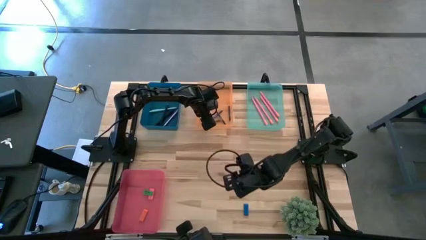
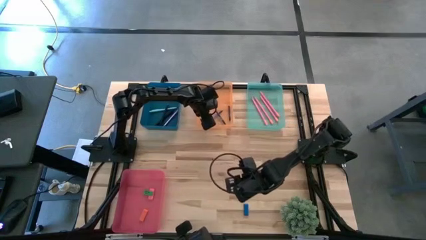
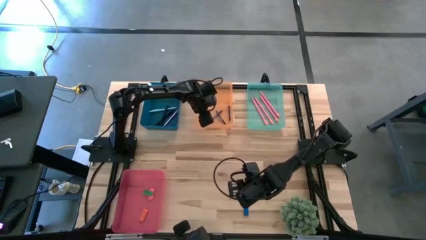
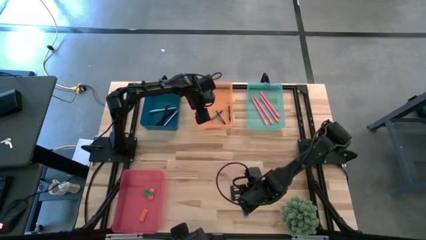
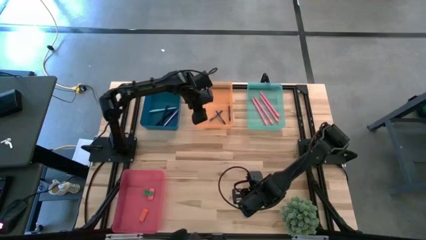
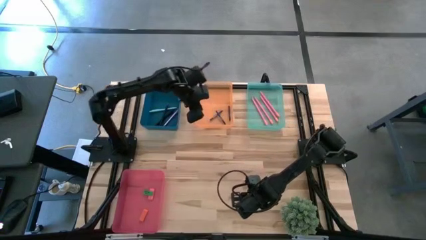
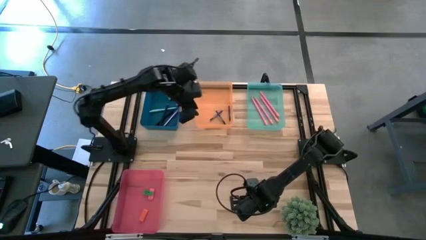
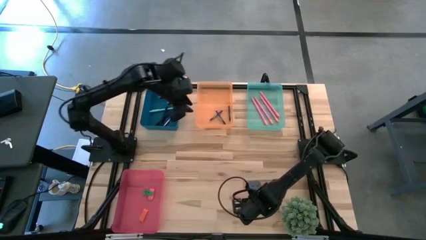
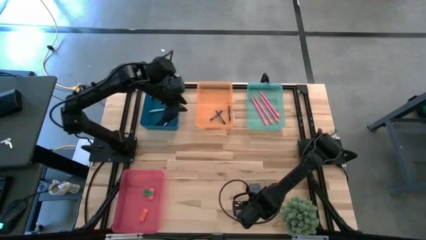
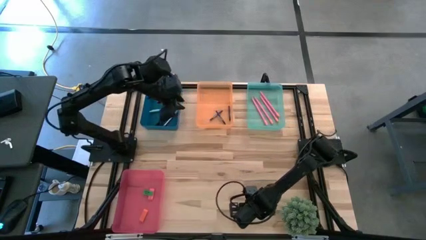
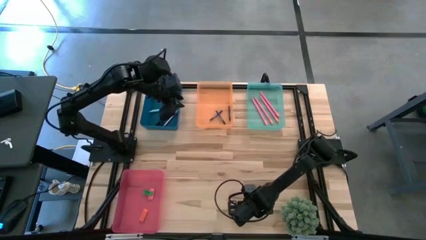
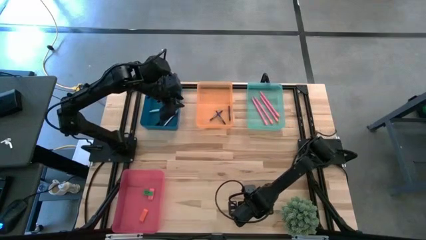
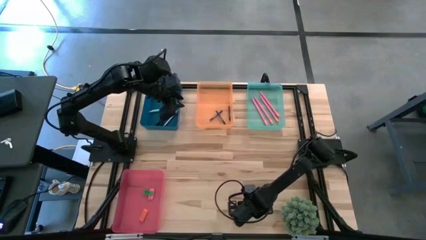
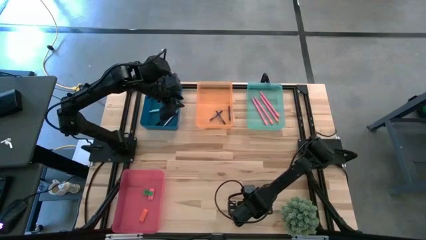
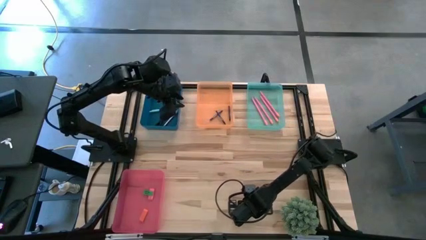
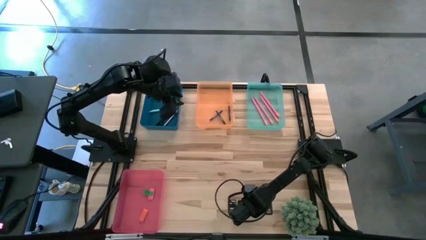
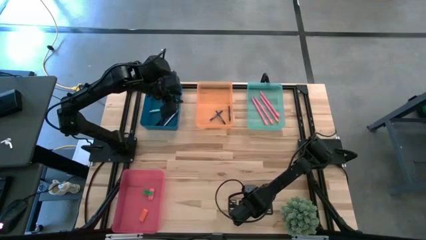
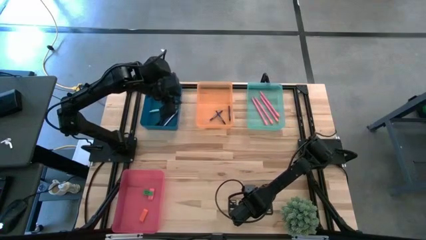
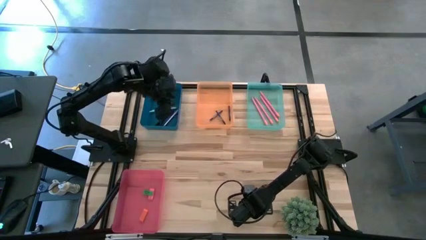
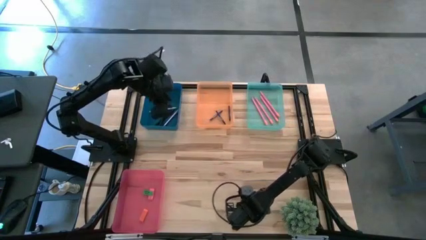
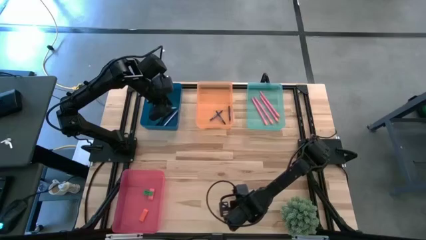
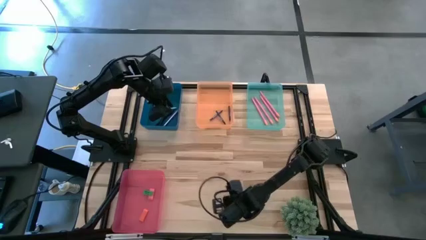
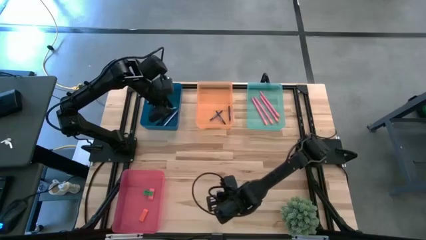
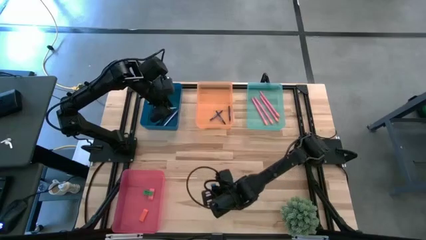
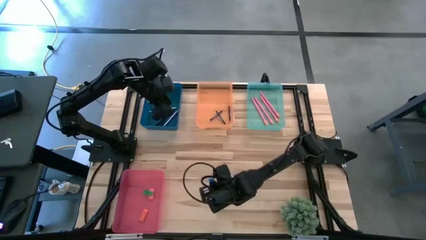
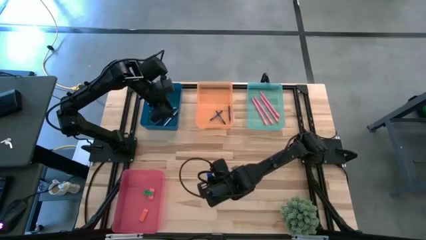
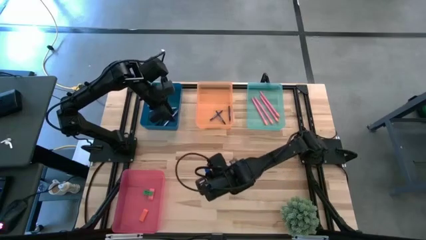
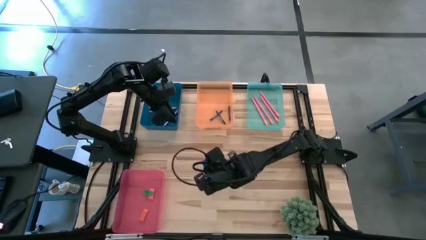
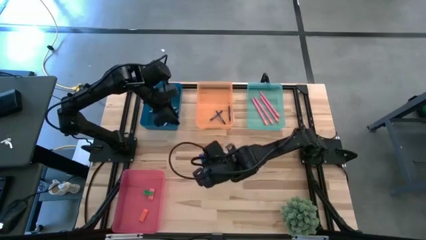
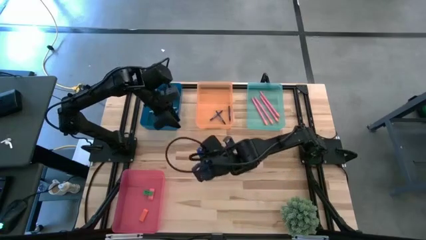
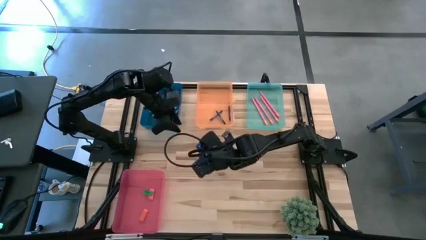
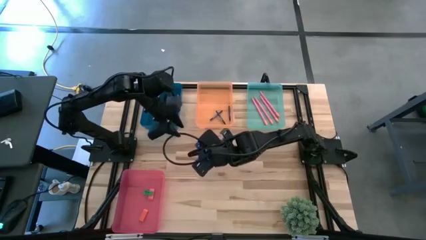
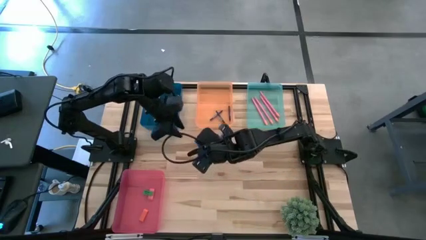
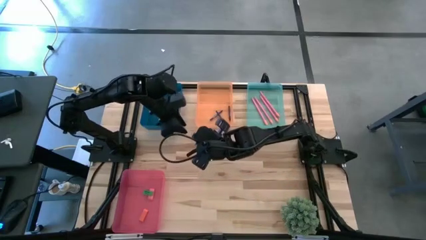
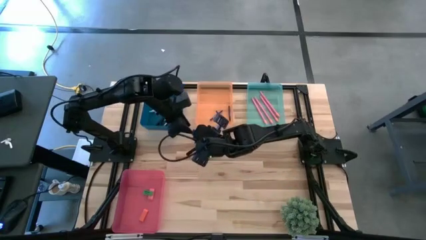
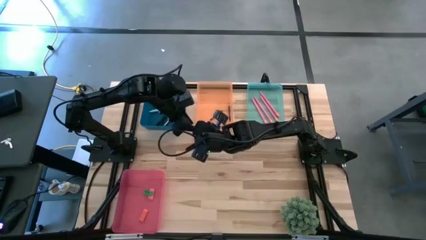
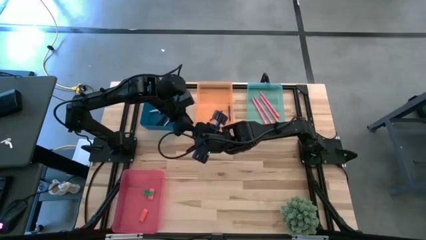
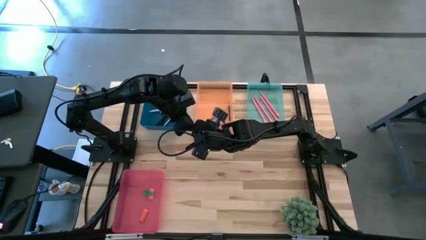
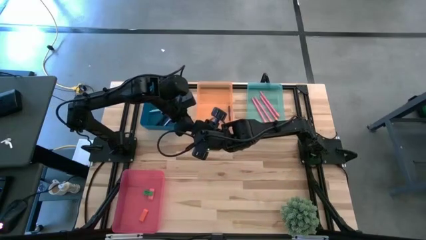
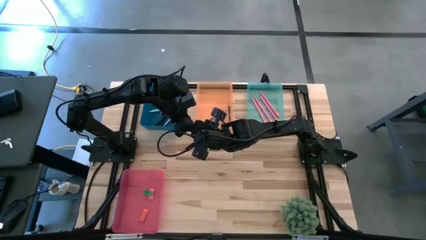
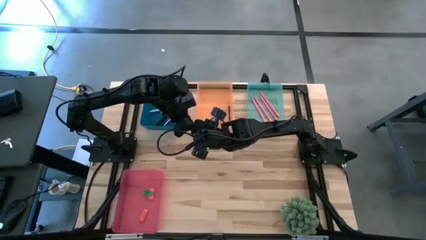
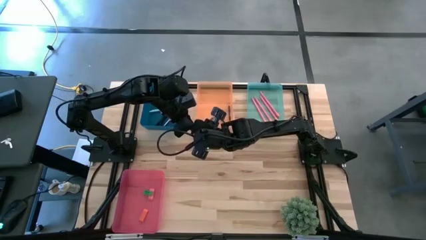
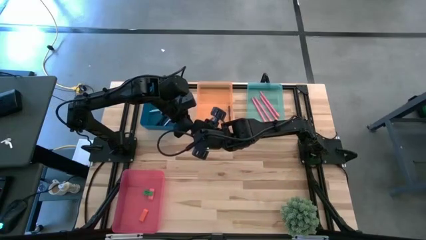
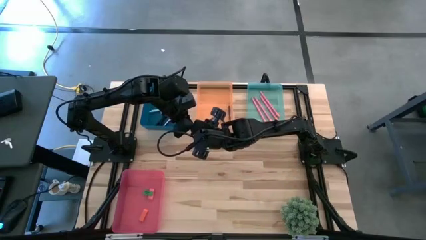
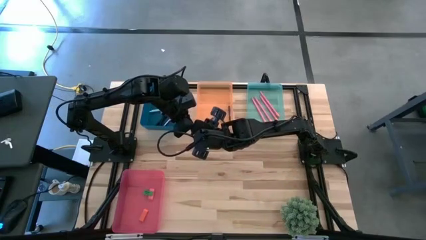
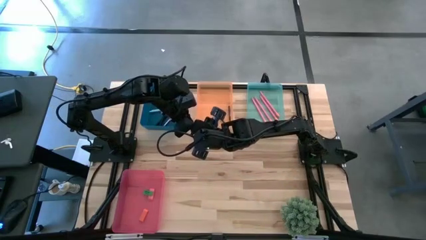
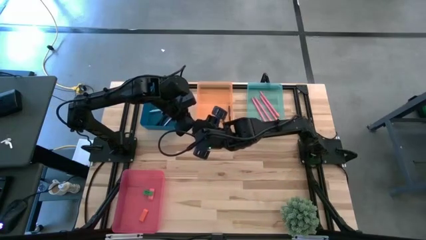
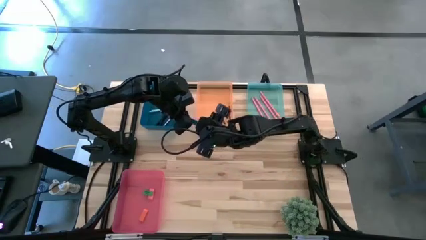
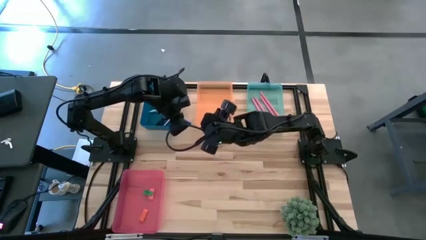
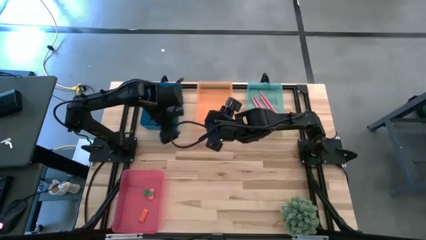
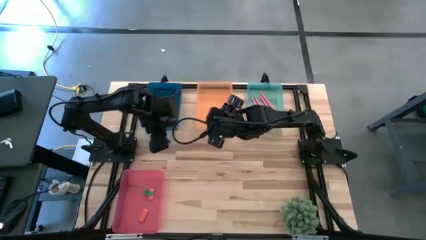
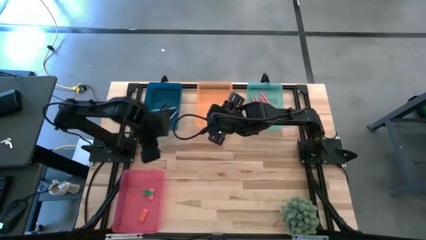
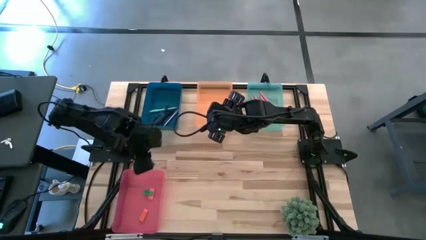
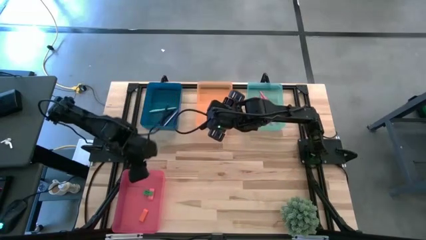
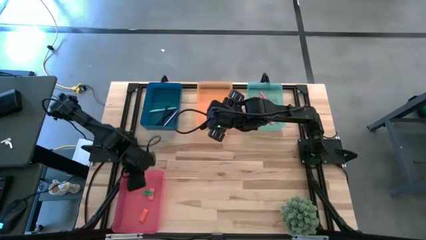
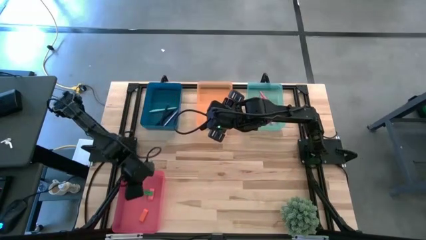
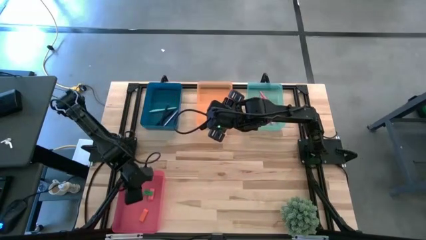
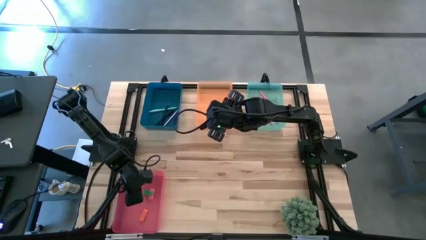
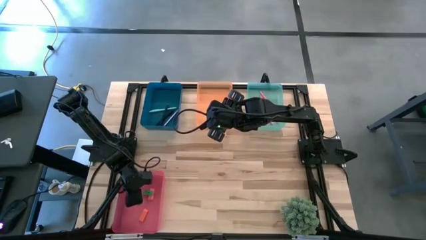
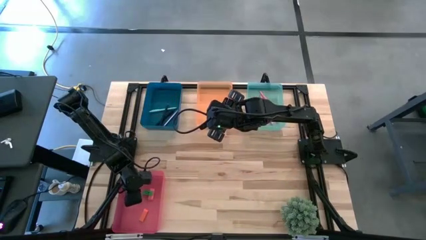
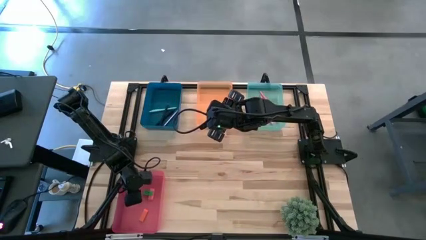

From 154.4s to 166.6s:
Task: Sort crayons/erasers/pens/pencils in bins
Put the blue eraser into the pink bin
